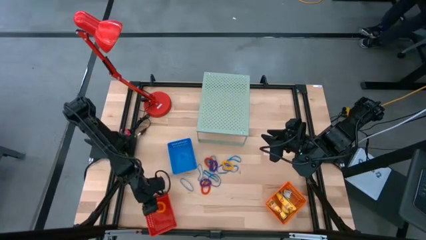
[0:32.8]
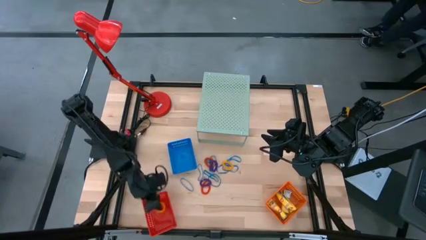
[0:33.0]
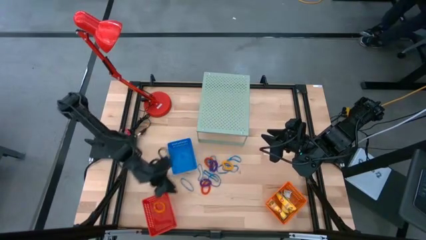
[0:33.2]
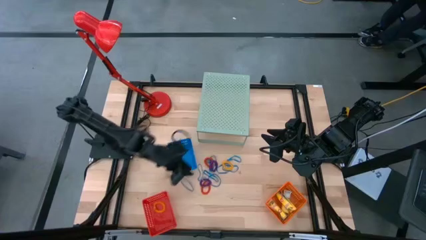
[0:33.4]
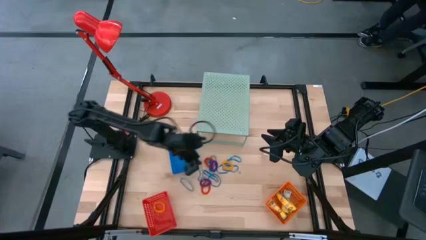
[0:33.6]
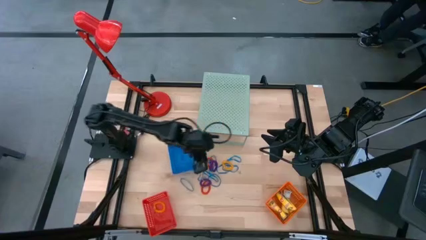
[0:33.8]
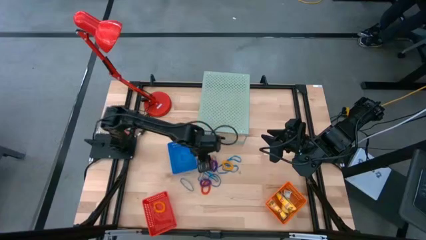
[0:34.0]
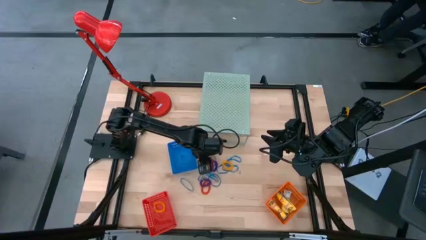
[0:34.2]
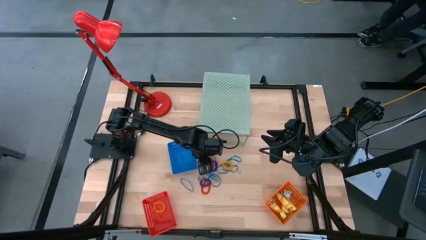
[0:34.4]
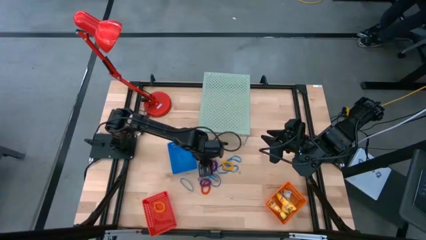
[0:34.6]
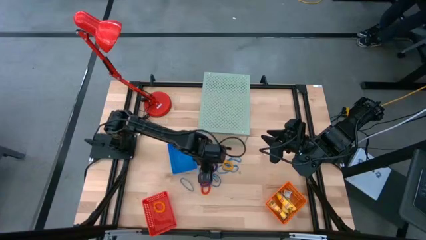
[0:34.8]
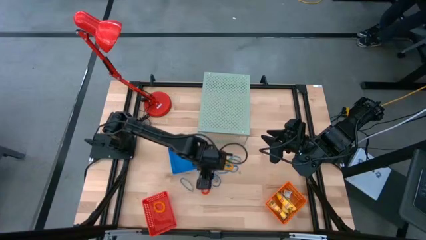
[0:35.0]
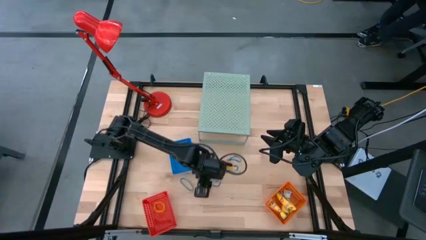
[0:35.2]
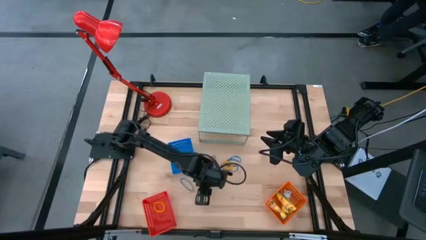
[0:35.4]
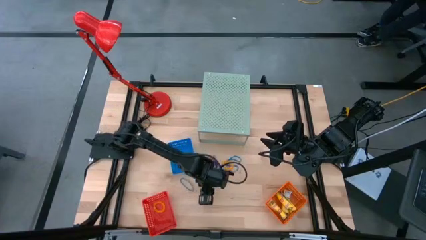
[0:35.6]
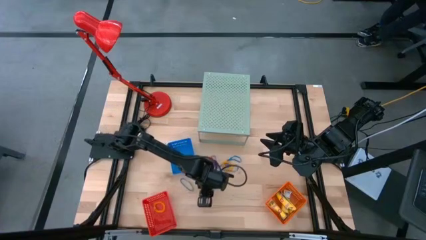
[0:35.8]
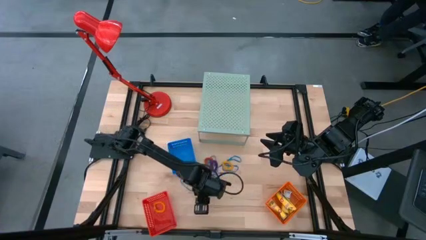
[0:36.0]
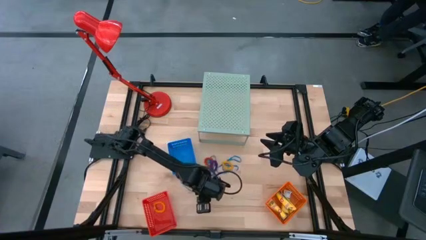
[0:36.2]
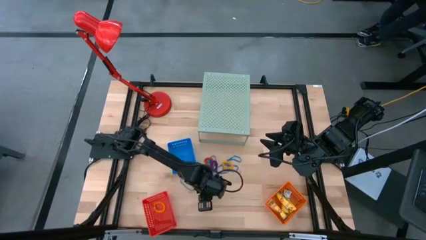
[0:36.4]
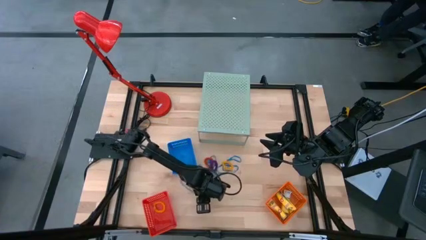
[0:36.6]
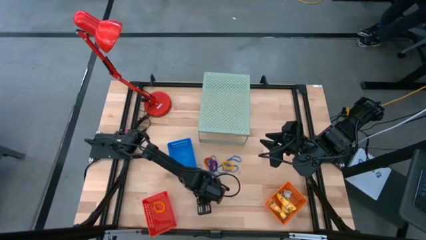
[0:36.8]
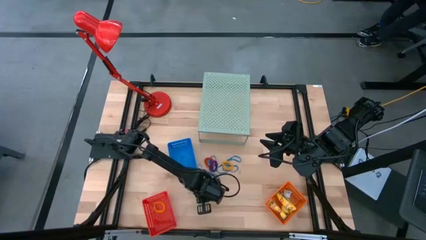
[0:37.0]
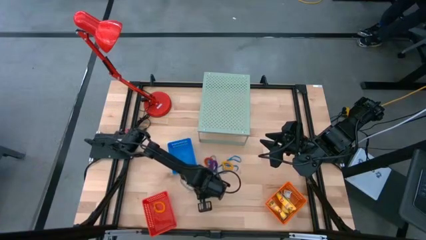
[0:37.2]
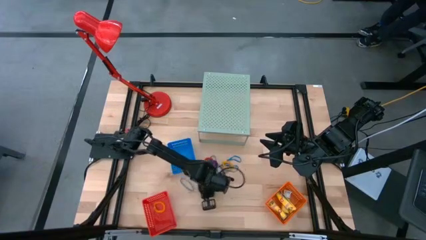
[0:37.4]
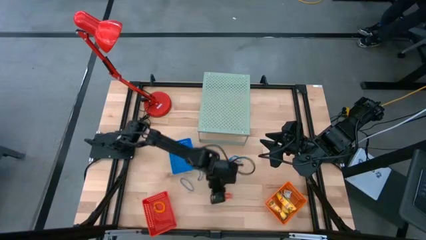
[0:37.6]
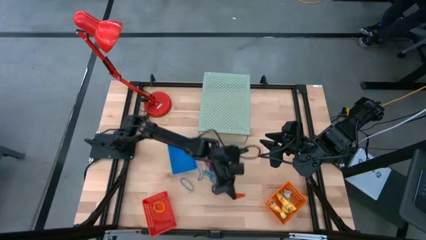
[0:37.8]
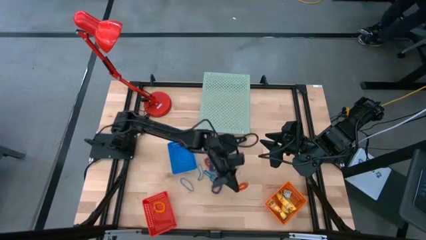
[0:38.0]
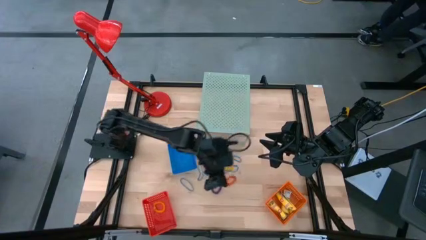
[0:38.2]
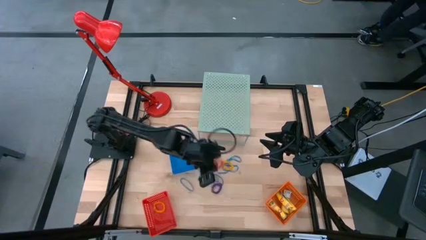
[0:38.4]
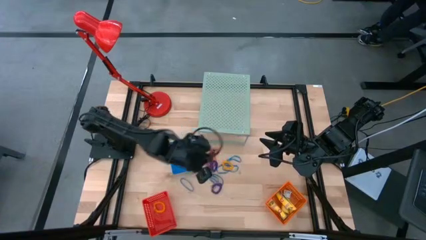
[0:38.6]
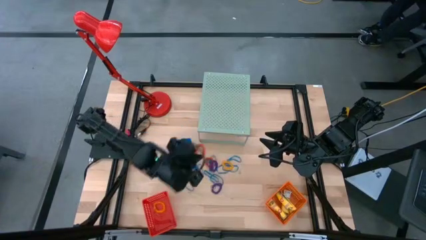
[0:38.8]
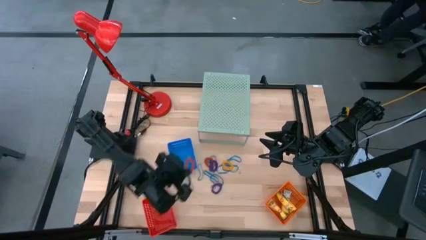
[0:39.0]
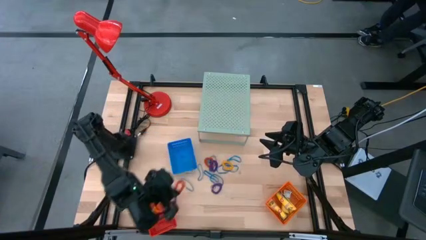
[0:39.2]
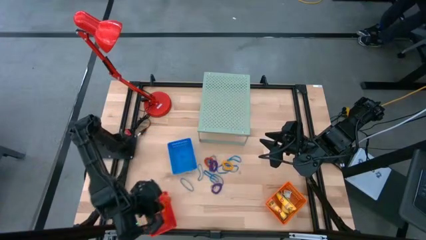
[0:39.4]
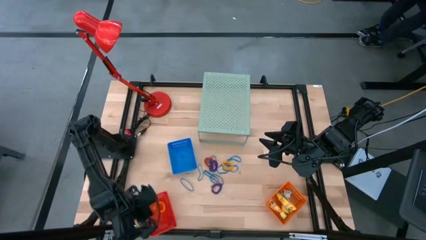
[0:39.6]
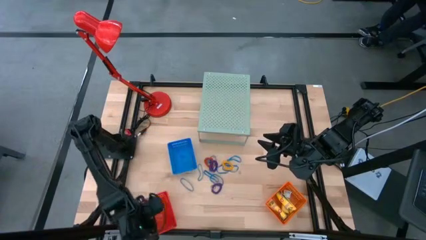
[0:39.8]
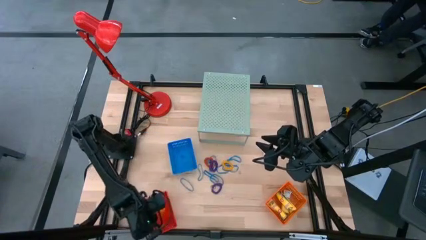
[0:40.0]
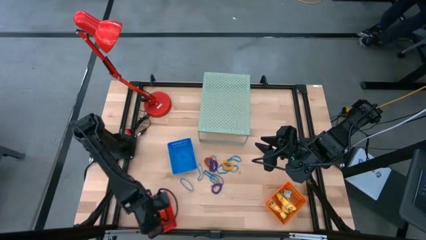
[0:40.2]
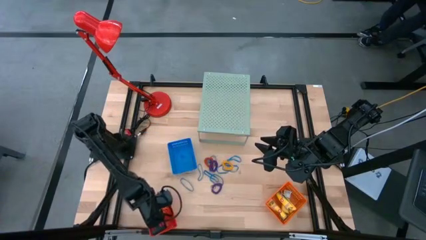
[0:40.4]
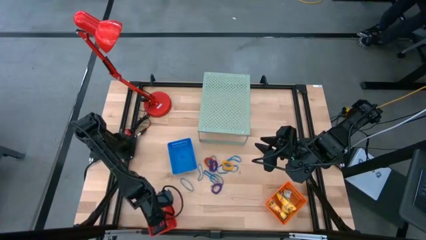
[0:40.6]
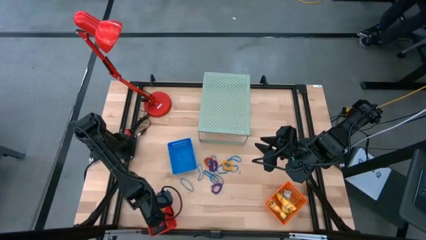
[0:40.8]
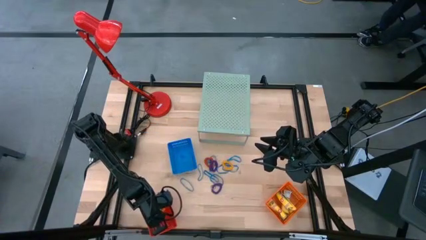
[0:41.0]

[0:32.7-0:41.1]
Task: Pick & Place Office Desk Supplies
Put the orange spring keychain into the red basket

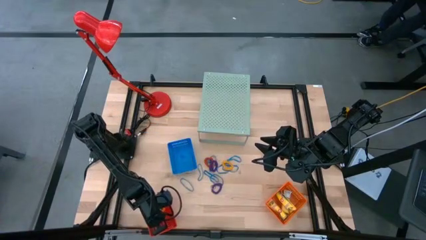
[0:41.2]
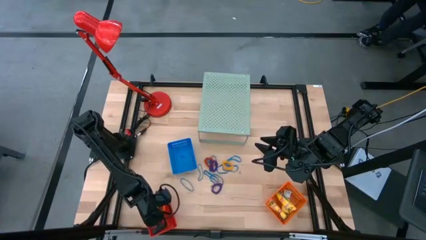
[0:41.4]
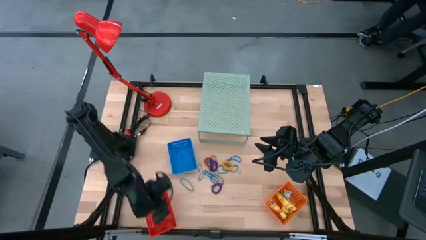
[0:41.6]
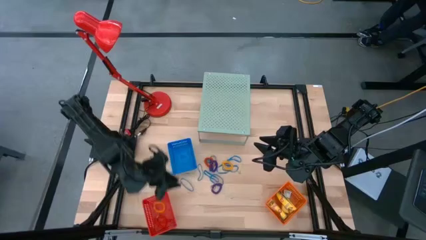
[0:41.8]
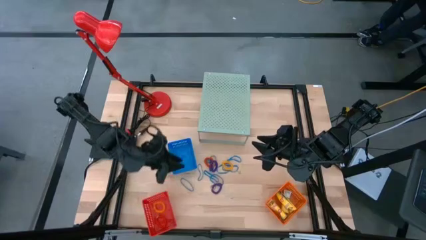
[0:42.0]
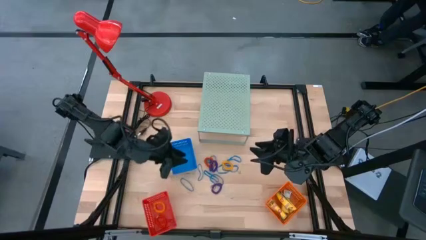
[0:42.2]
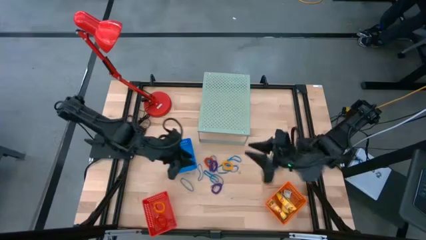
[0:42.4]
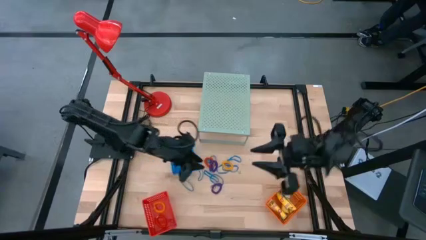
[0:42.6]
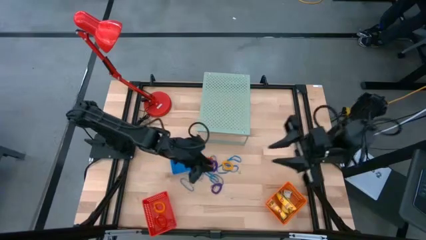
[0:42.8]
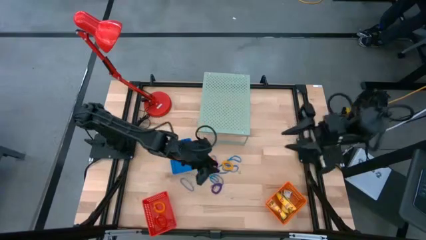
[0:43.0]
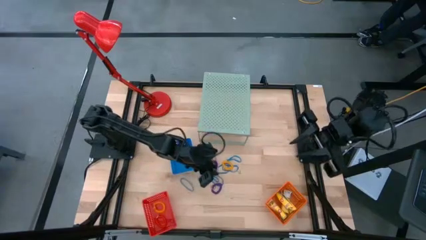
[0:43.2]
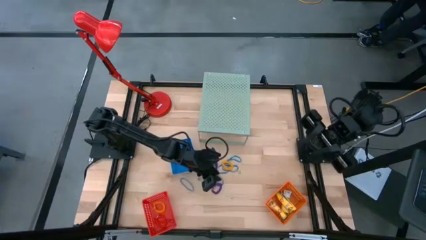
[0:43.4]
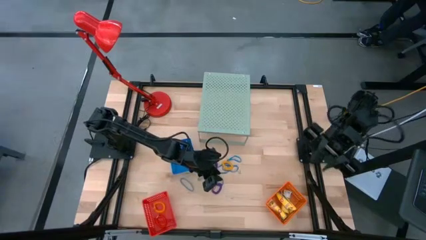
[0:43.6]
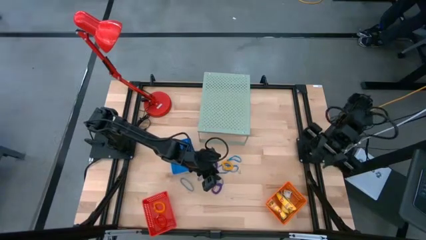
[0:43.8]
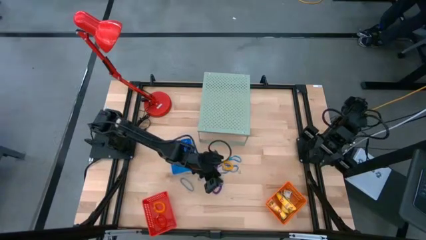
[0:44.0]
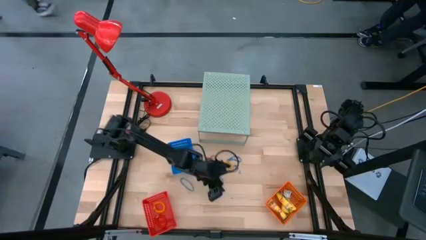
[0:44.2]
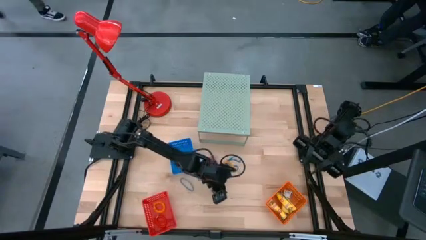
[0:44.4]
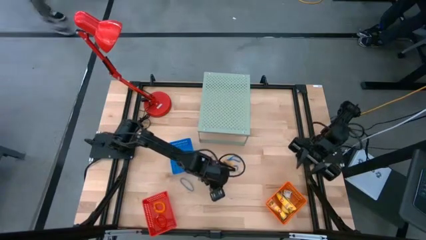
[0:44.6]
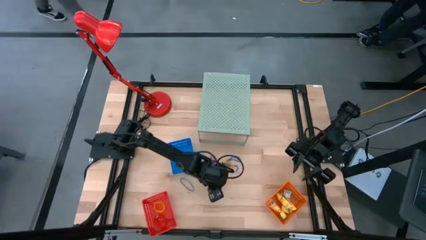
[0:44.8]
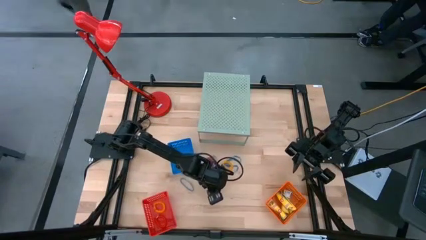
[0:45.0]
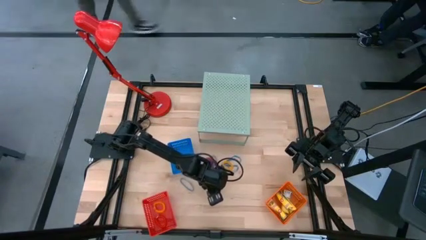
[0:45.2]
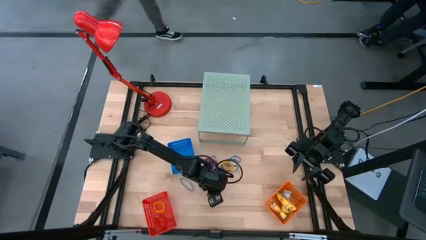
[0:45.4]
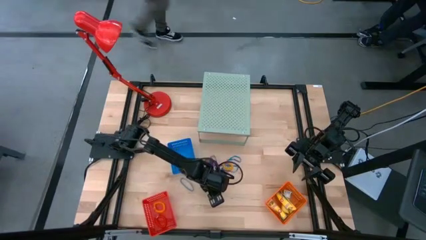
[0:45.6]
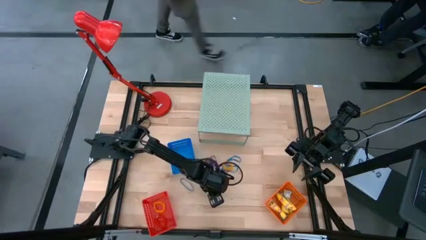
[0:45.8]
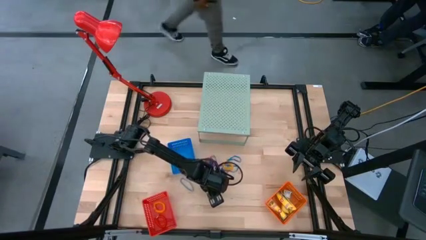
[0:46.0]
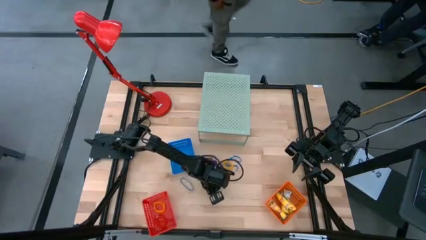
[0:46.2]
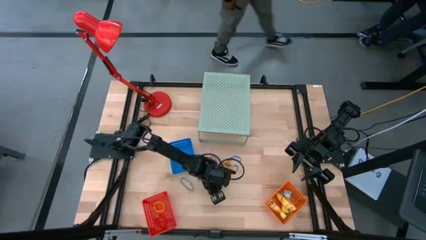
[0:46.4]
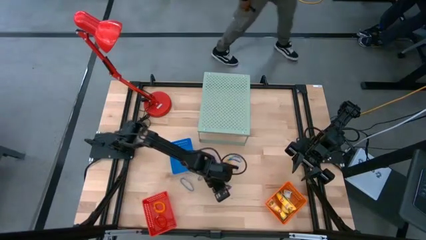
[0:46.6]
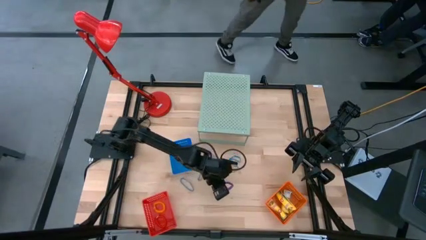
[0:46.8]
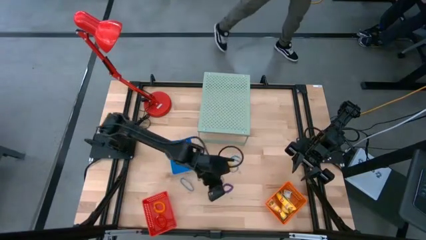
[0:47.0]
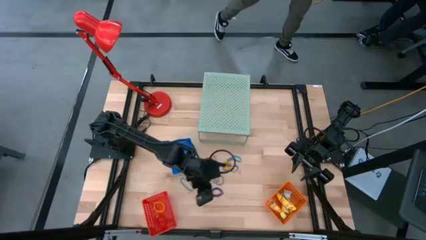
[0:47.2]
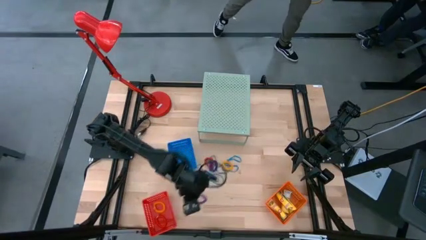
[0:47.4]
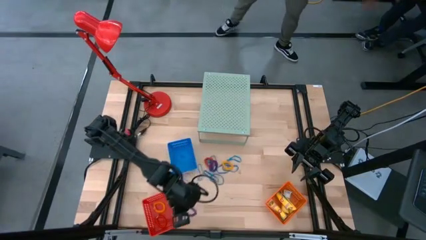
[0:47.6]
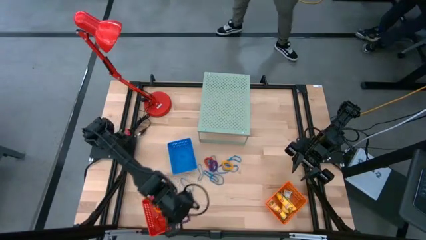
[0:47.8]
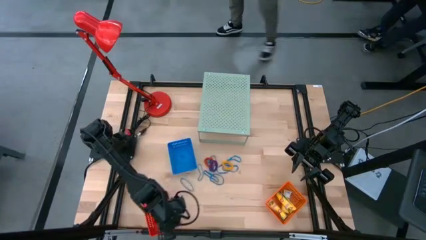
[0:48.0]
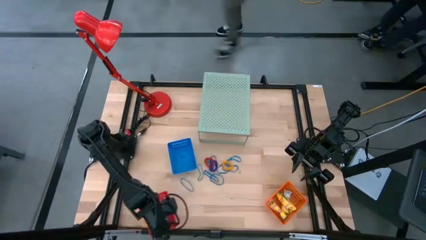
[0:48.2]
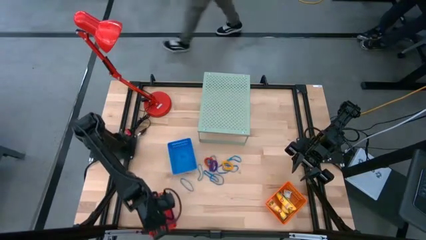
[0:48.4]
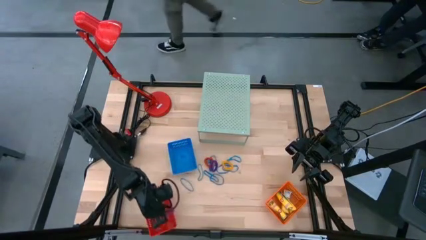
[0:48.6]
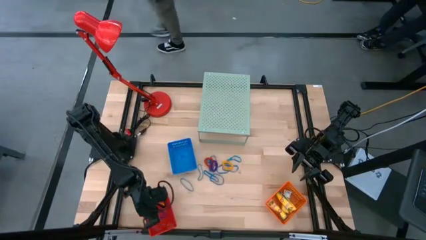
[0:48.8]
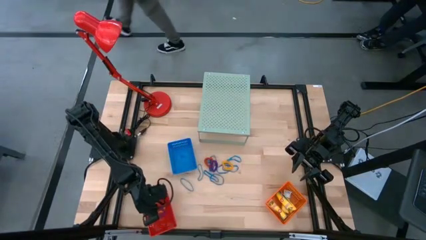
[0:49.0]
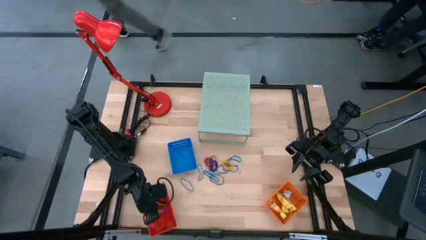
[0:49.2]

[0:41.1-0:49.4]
Put the purple spring keychain into the red basket
